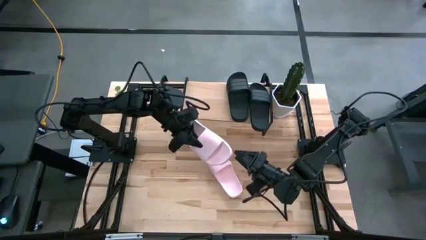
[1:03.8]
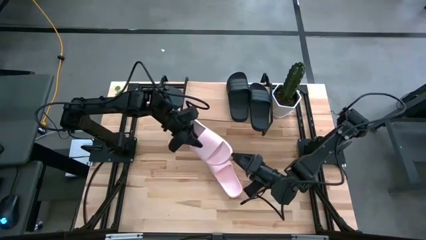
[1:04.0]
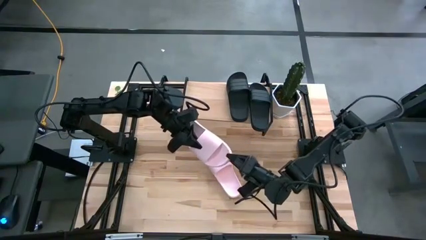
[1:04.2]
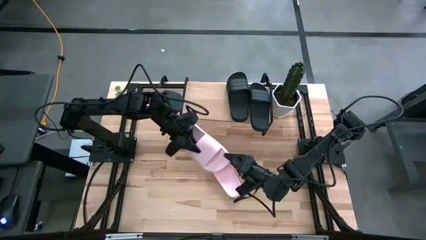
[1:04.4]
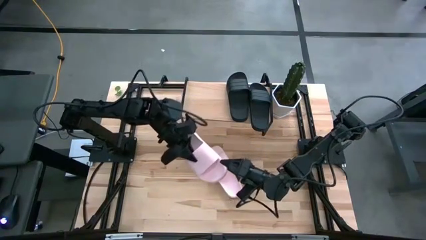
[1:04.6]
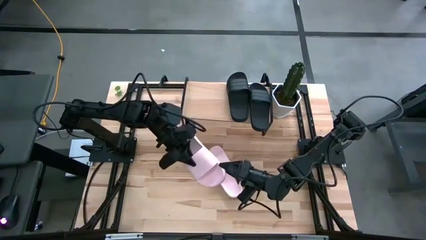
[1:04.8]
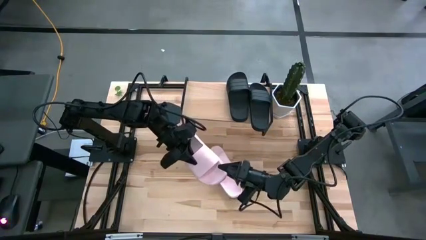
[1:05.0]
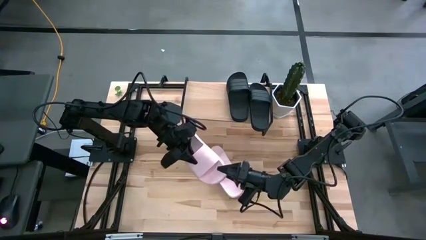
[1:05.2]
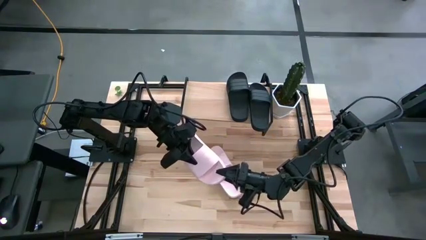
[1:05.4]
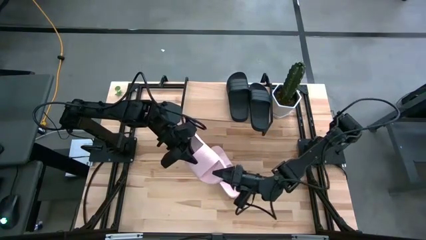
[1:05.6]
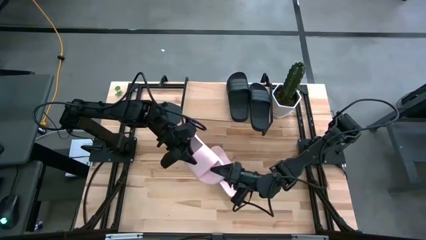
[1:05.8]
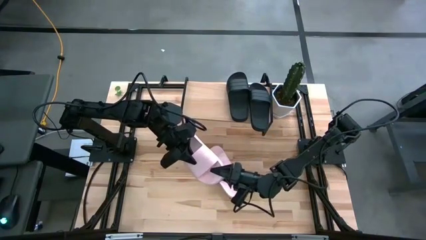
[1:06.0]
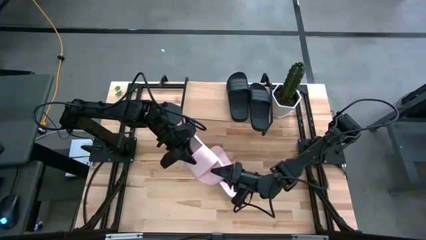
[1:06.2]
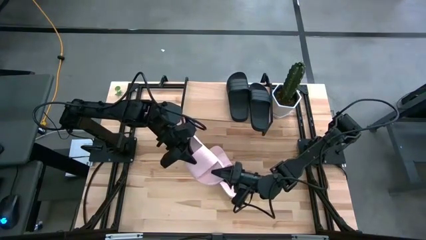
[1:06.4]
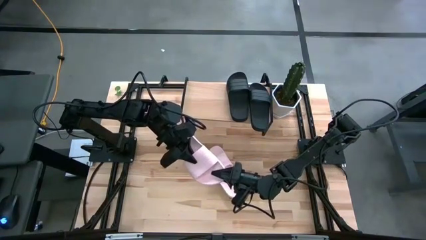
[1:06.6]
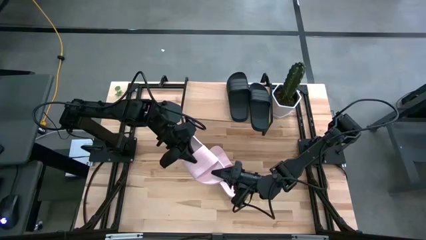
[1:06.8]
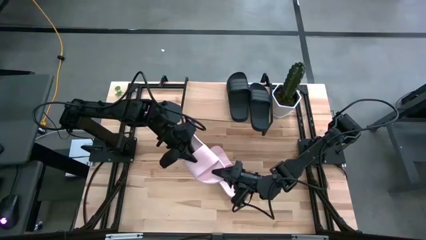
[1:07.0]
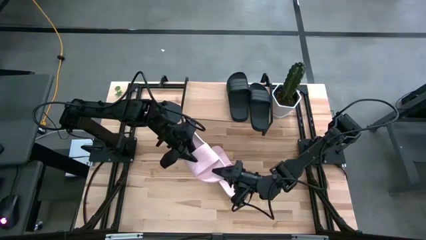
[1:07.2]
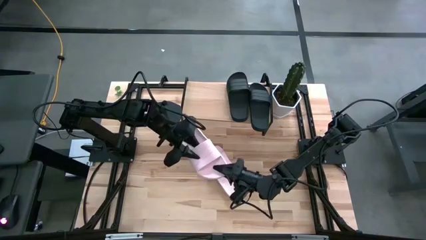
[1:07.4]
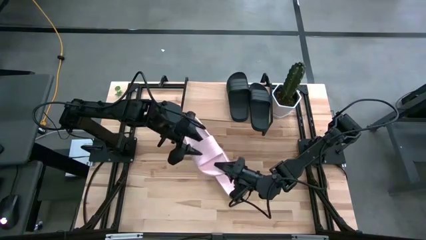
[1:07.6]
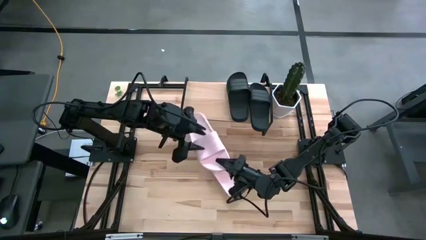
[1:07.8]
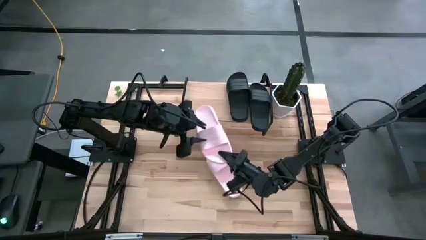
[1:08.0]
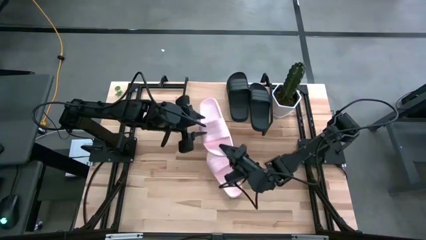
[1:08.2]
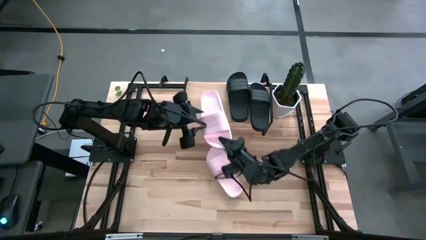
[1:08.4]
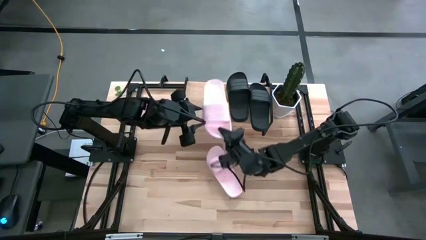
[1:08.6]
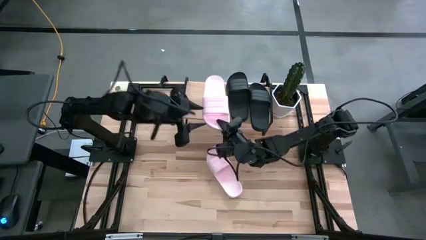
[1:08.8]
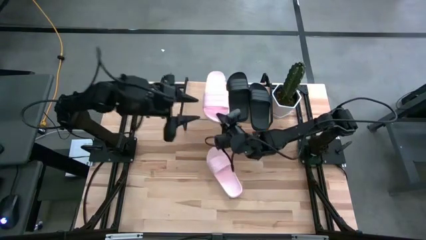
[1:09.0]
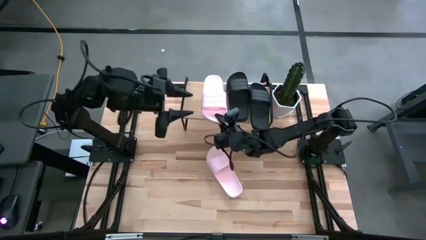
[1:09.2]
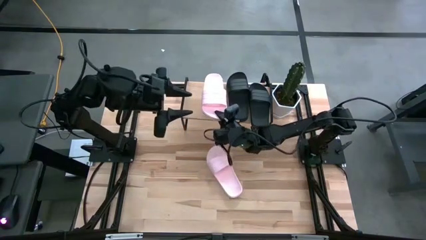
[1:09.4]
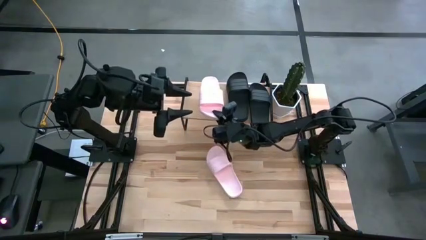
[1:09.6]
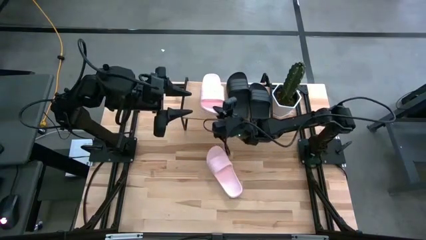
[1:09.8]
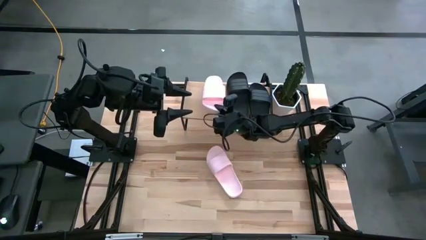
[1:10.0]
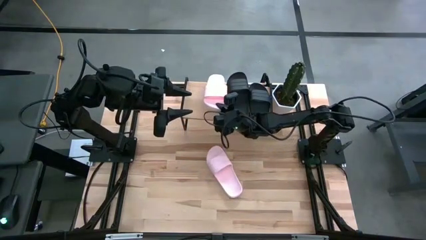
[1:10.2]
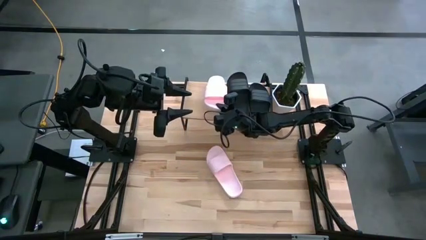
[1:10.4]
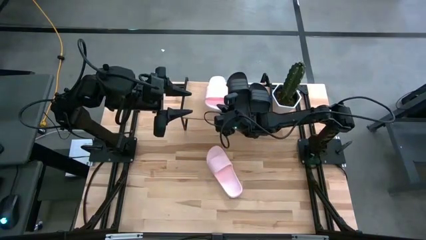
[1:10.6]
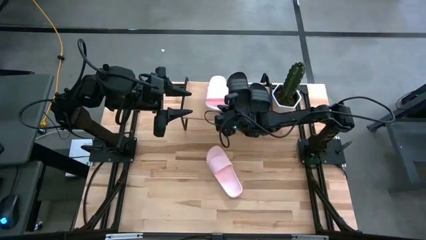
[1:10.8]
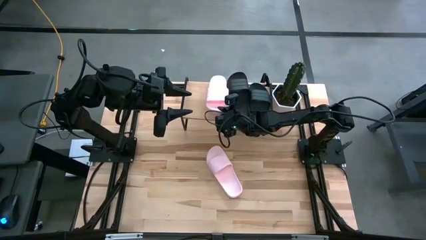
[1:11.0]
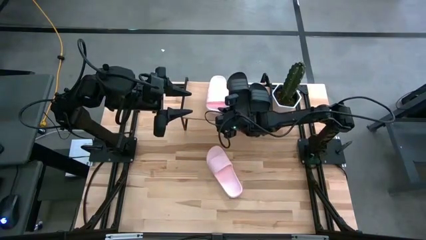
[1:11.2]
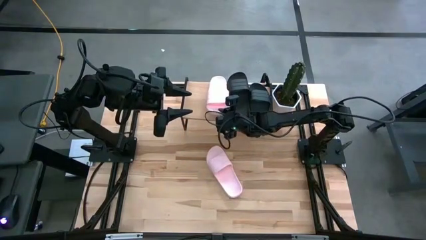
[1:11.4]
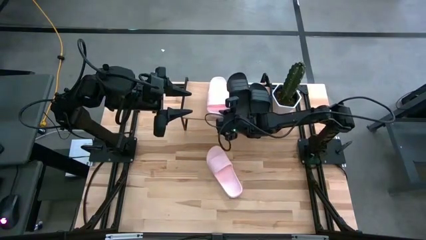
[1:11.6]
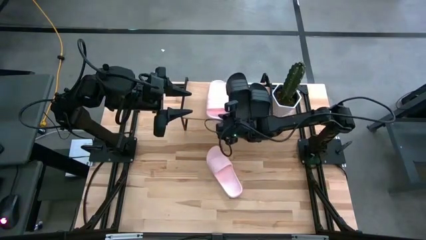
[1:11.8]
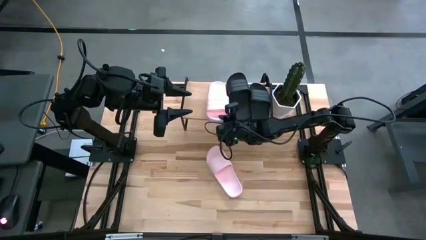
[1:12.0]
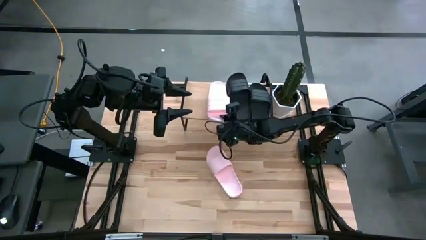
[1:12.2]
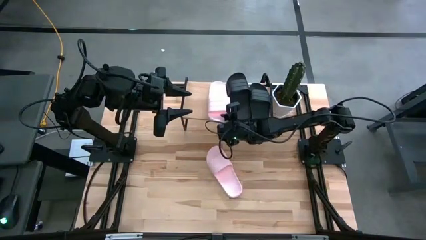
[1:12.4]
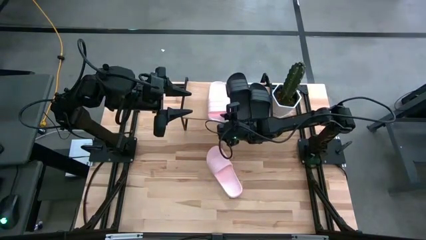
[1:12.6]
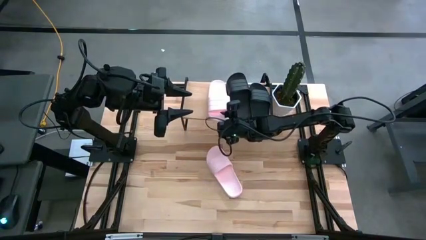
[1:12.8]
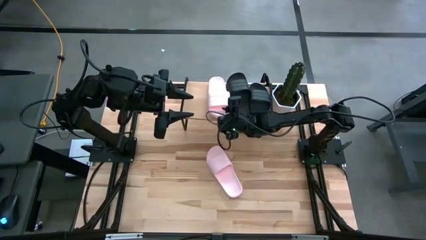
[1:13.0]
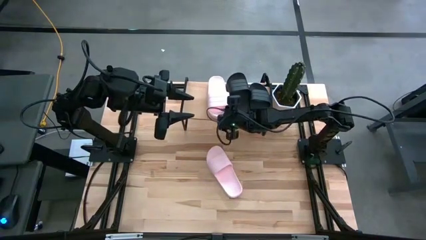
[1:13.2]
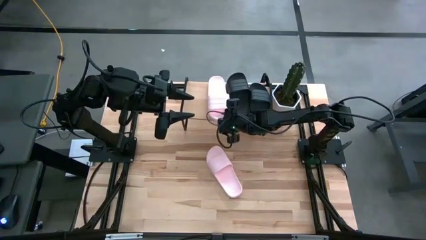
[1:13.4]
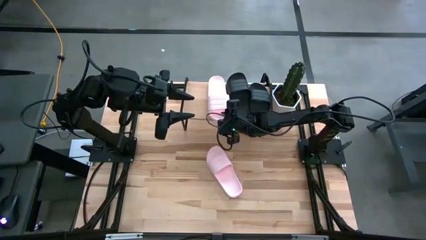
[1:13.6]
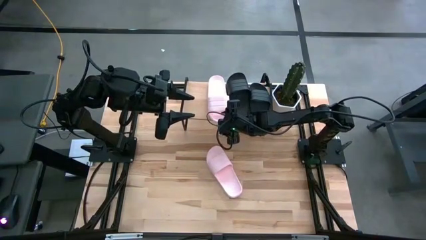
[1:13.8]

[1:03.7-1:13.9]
Task: Pick and place slides into the shelf
Put the left pink slide on the shelf

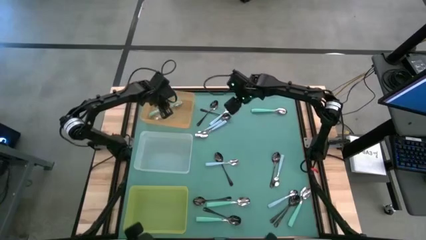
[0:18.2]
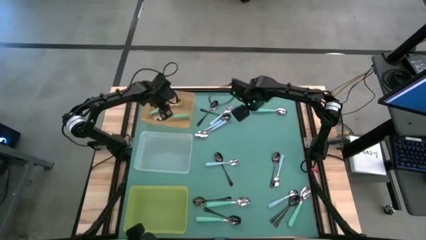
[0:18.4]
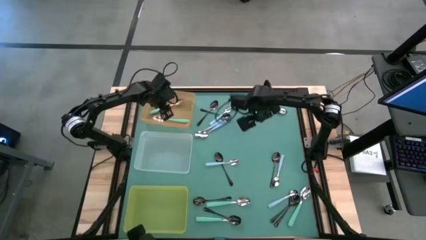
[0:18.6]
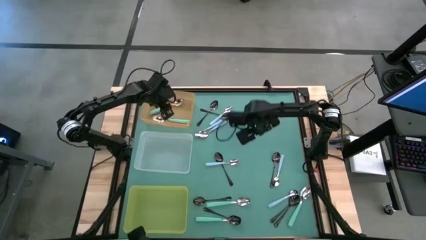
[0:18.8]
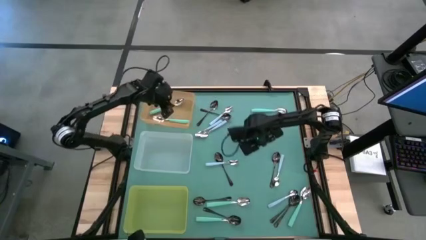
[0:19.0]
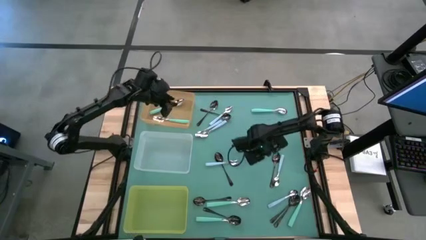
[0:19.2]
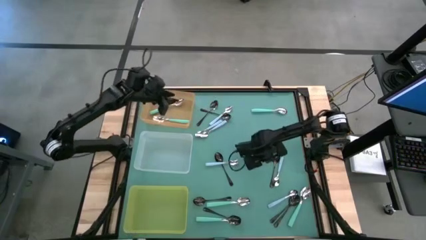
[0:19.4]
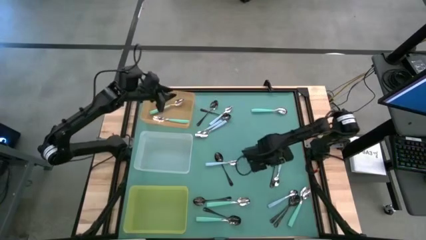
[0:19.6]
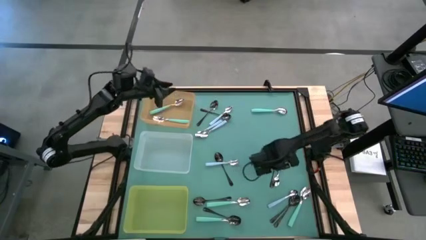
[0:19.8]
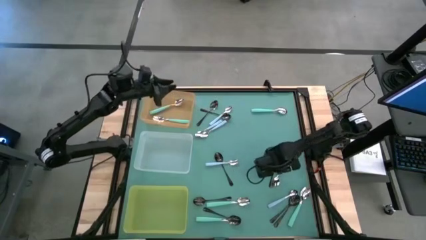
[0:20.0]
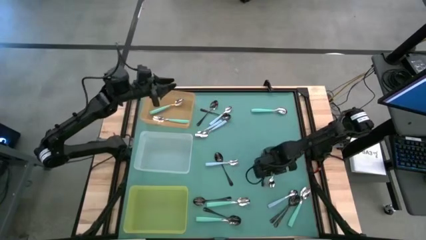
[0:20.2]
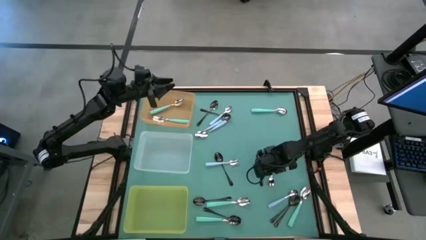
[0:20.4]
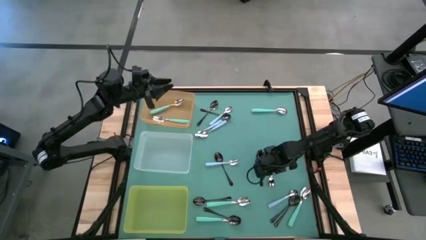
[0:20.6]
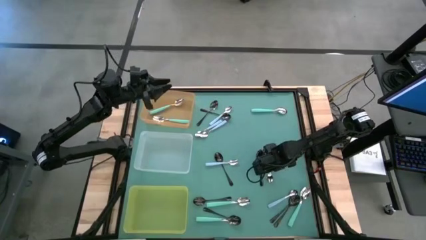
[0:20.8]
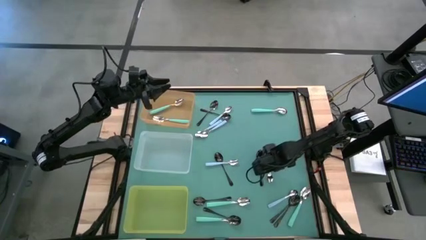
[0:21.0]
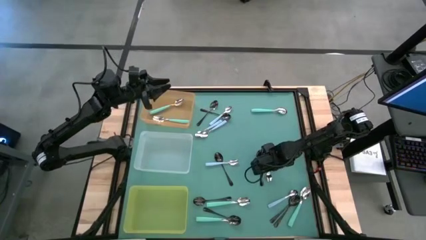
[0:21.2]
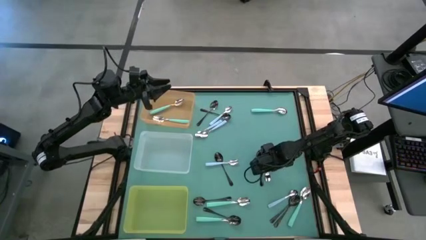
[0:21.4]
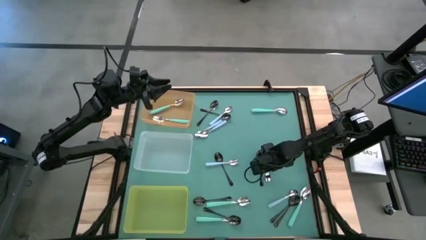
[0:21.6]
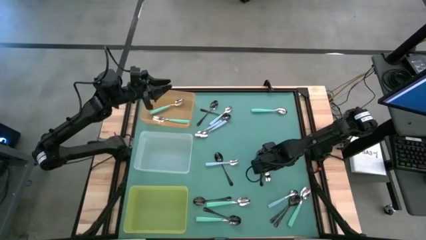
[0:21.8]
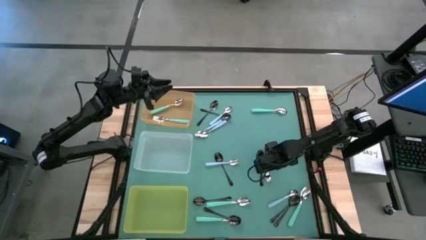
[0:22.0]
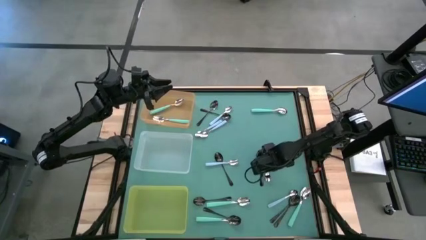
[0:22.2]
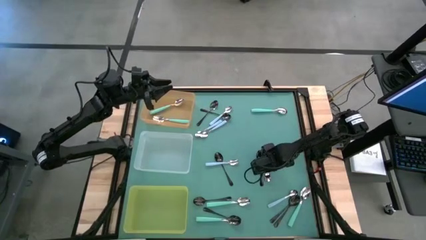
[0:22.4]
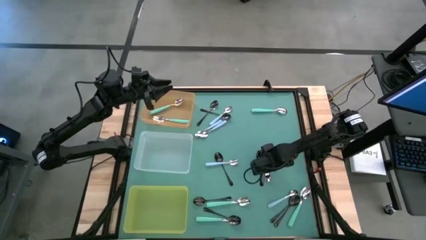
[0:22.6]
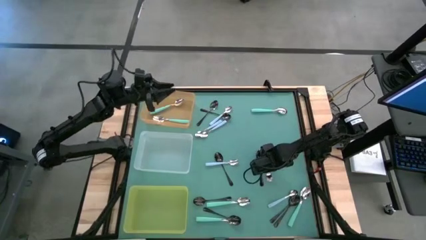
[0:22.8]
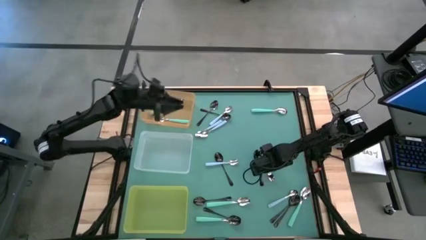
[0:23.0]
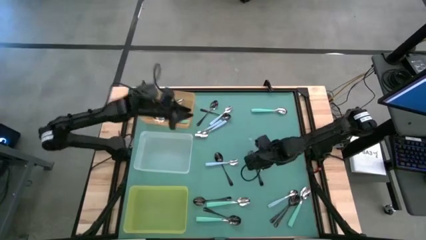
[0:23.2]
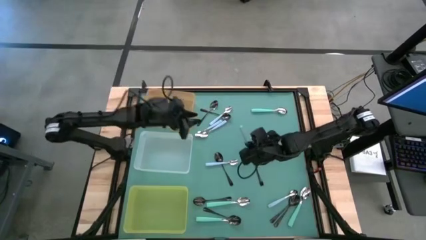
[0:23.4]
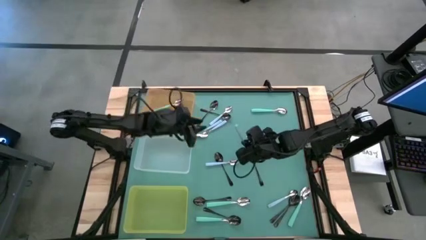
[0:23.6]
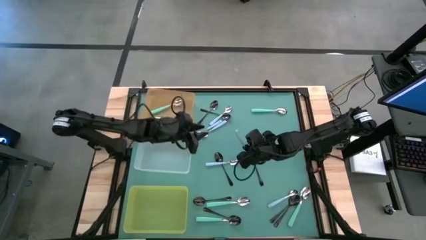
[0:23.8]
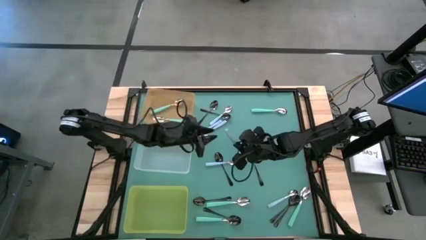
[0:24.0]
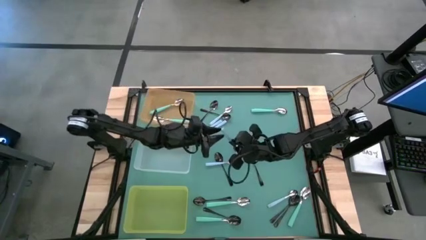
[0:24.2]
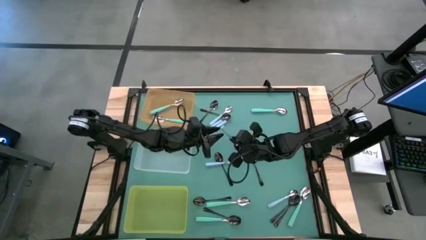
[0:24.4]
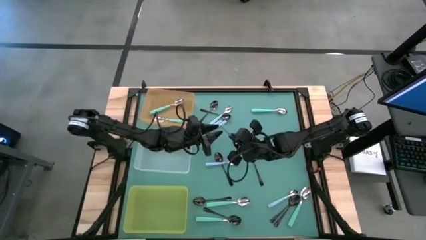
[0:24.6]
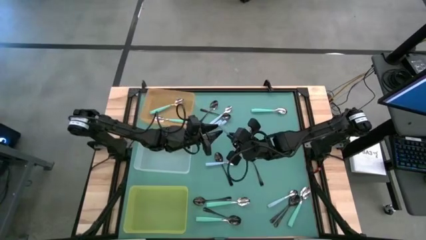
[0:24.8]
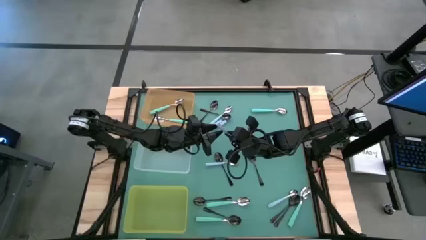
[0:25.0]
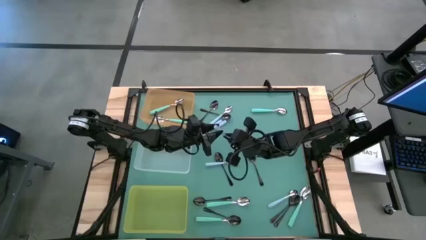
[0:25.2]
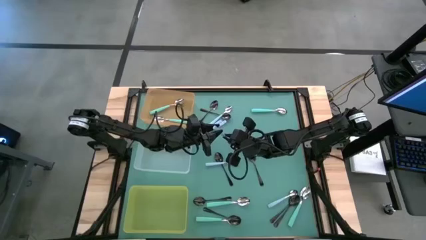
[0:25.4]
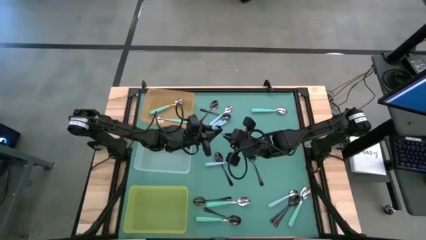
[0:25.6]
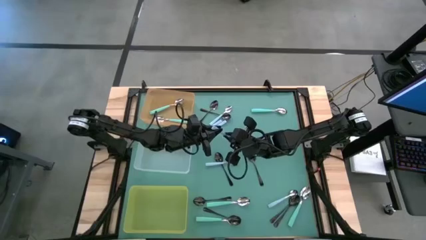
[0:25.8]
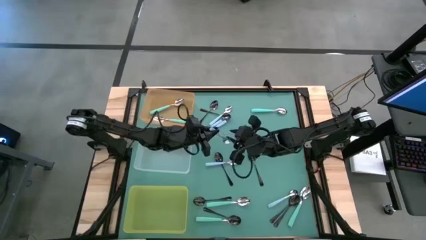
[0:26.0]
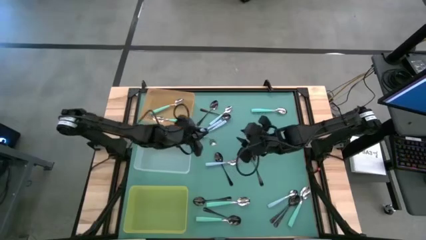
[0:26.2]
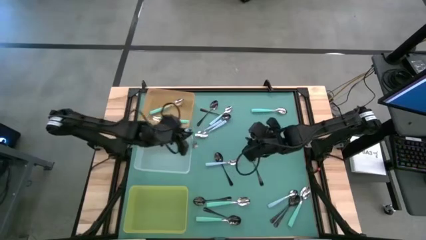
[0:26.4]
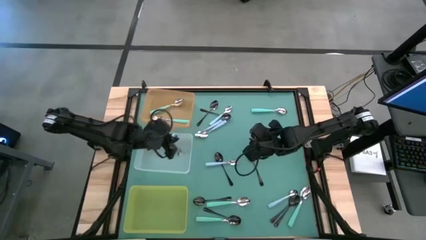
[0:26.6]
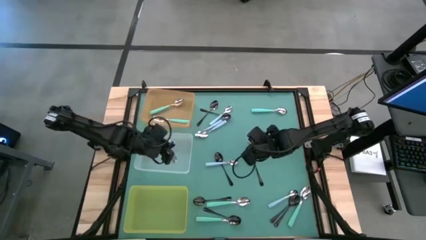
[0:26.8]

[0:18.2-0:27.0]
Task: Sort silverware by color (type)
Put the blue spoon into the transparent bin
